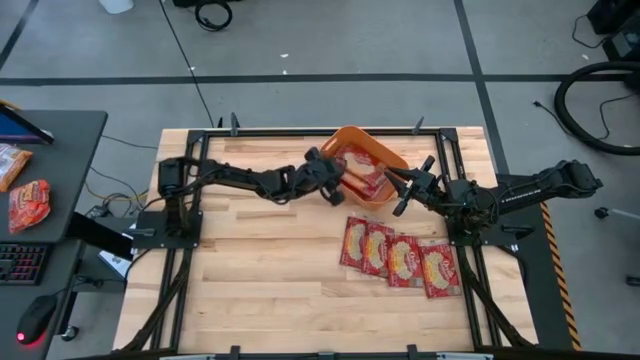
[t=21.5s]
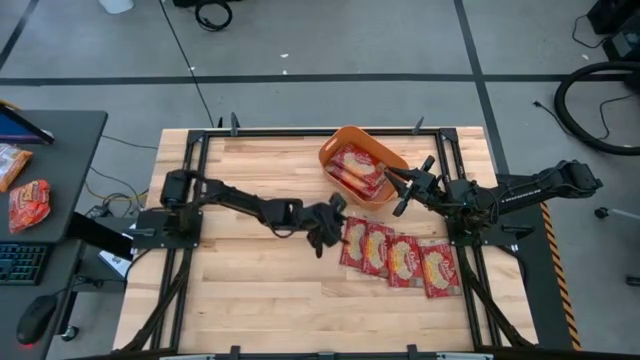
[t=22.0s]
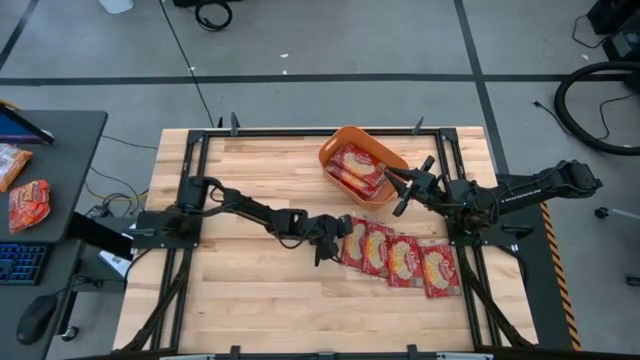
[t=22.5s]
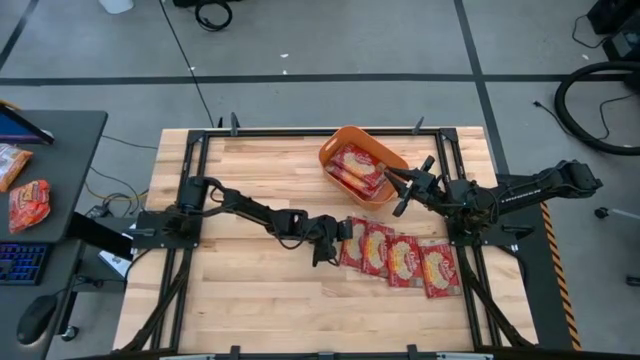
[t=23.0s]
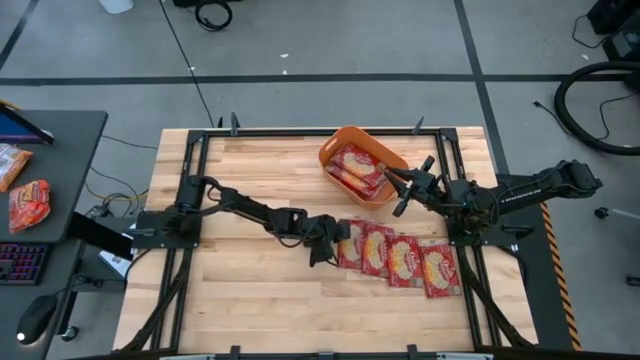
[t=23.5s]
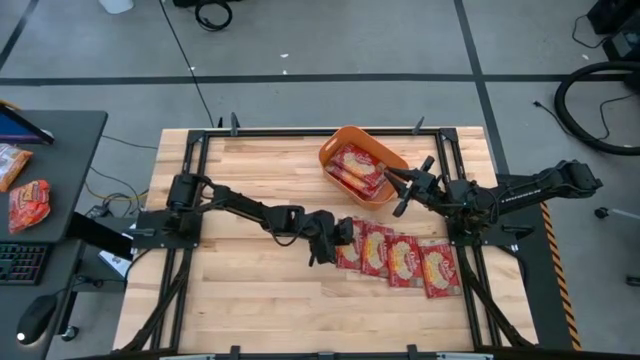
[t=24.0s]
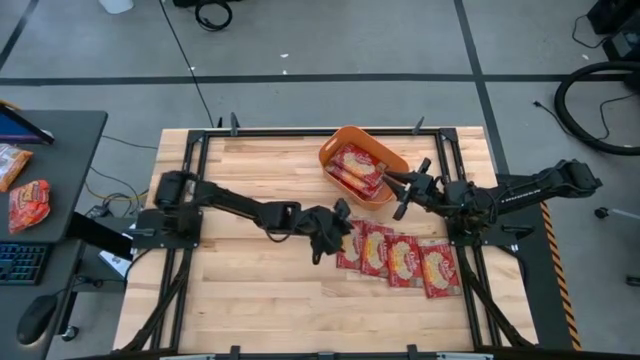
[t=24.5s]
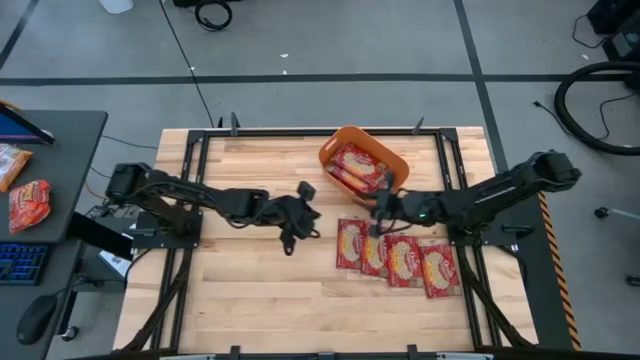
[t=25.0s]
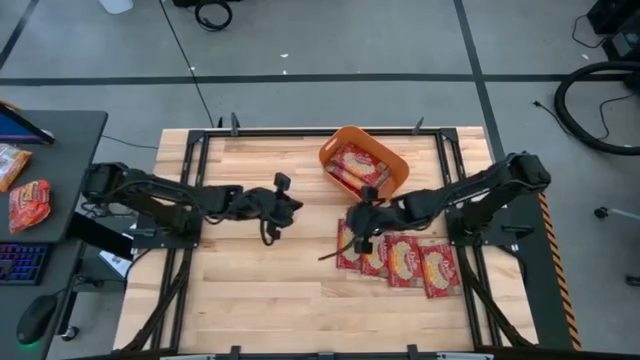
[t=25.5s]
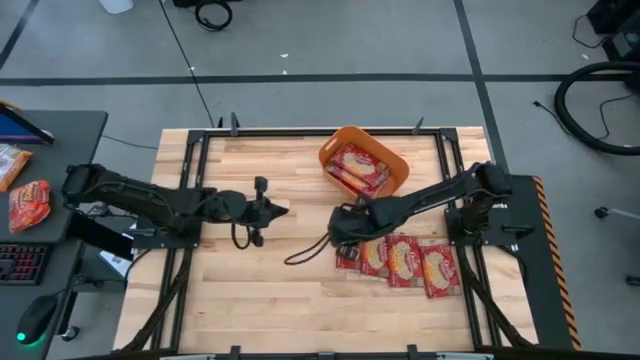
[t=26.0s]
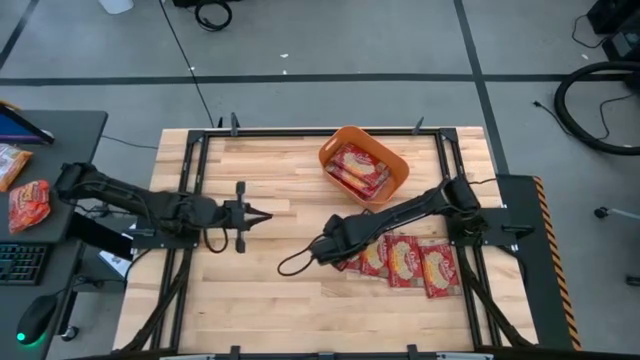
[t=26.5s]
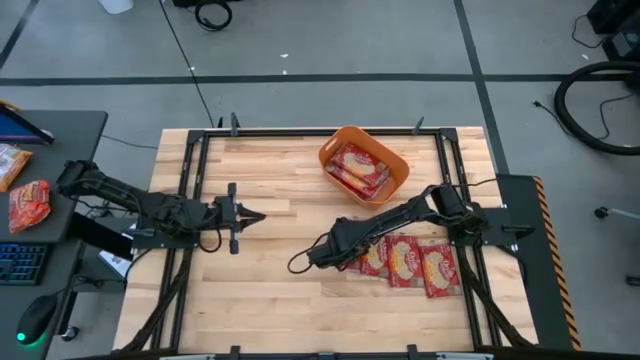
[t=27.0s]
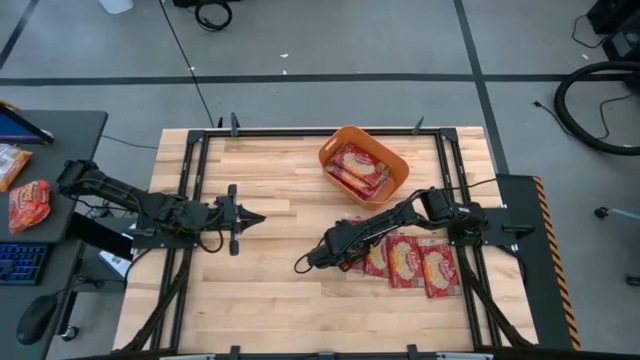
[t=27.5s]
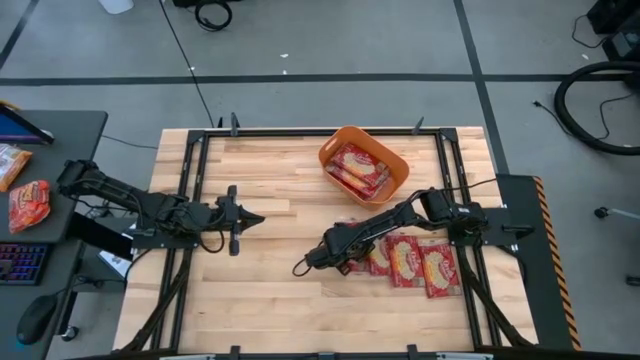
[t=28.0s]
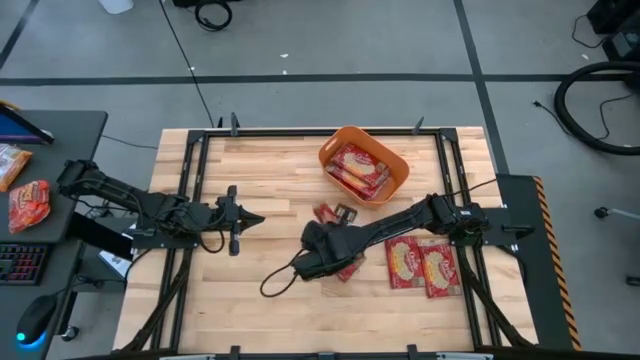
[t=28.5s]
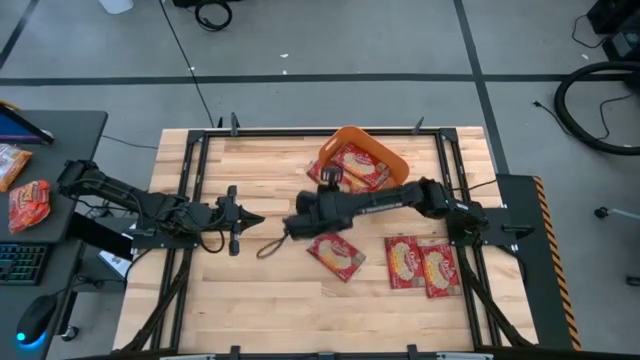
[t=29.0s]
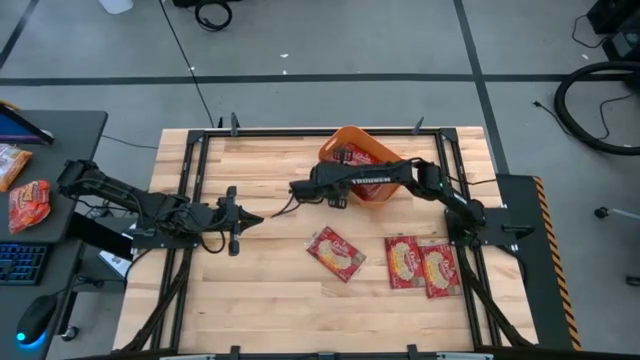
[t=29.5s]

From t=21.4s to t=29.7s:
Task: Sort popcorn bags into baskets
Put the popcorn bag into the bin

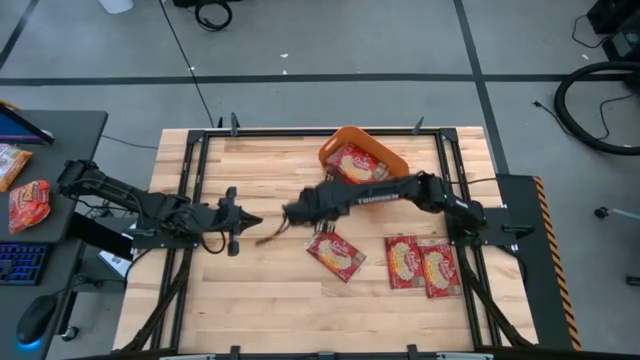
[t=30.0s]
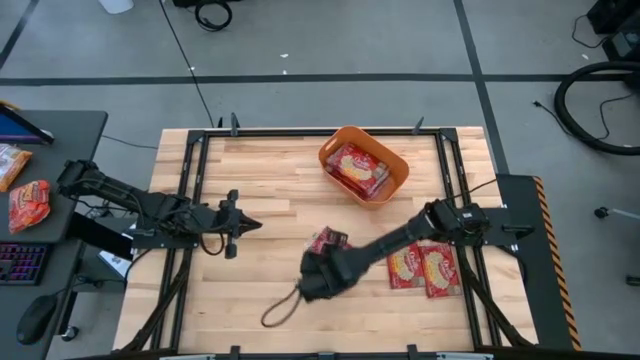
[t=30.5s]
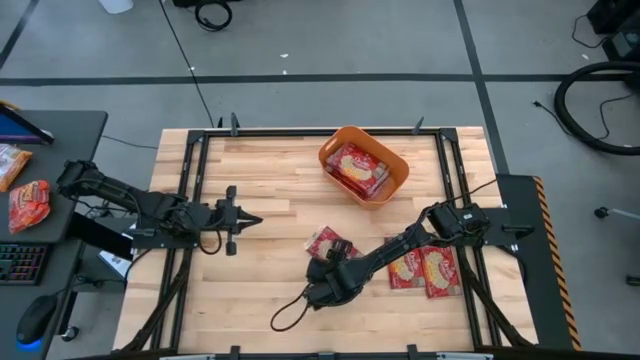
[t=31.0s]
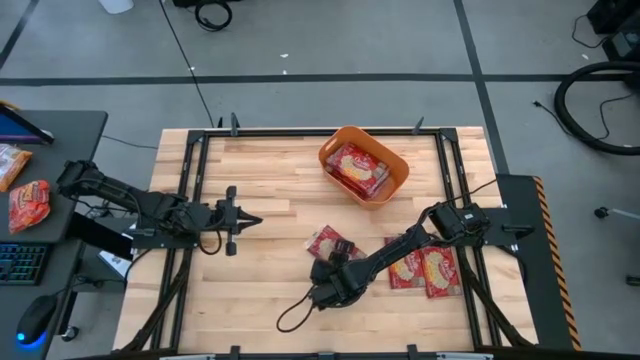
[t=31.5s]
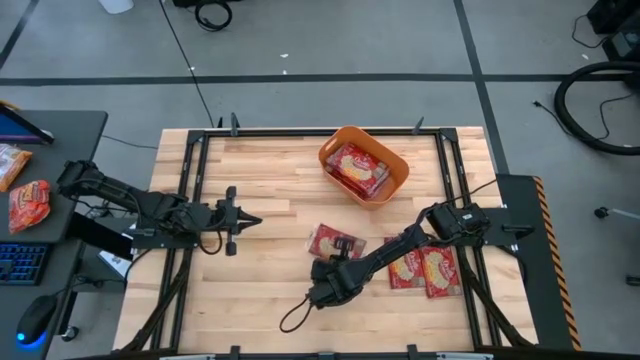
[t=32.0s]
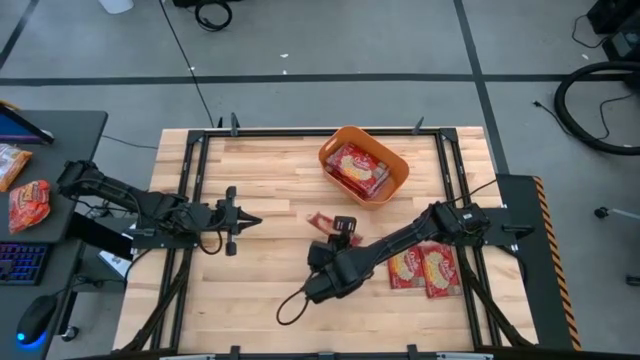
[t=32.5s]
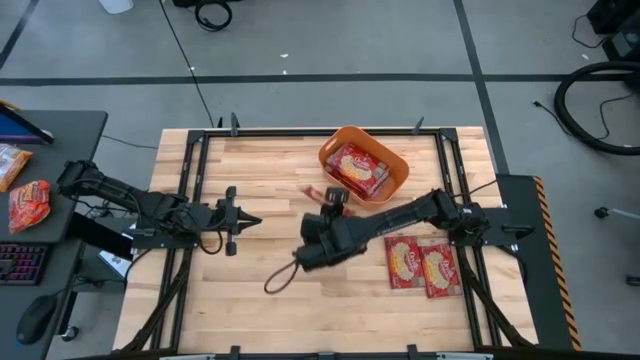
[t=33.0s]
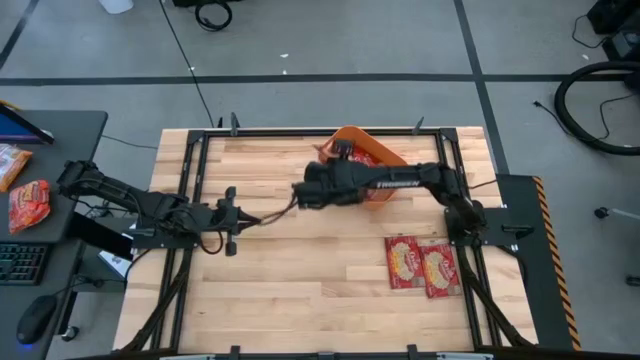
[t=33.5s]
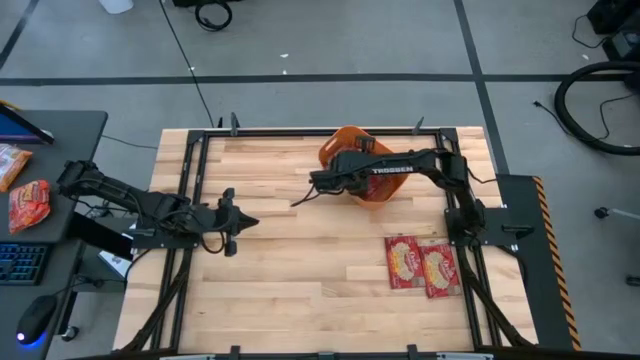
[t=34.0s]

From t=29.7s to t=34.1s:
Put the left popcorn bag into the bin

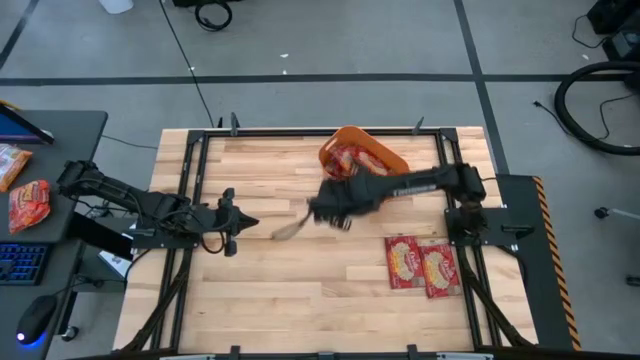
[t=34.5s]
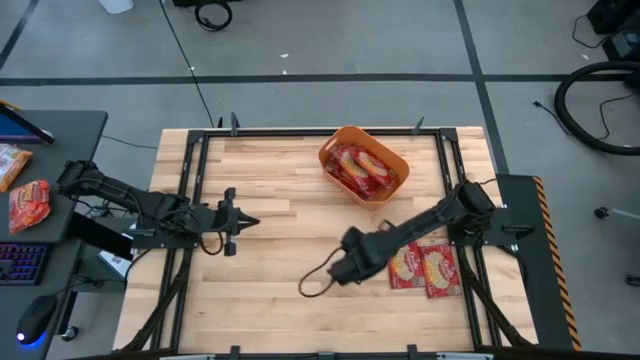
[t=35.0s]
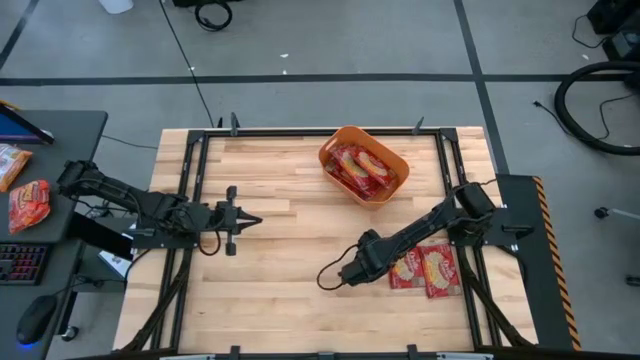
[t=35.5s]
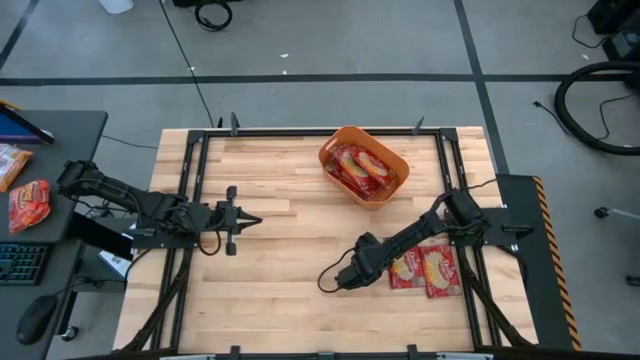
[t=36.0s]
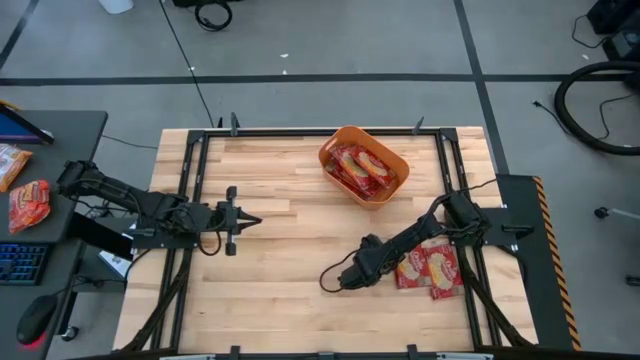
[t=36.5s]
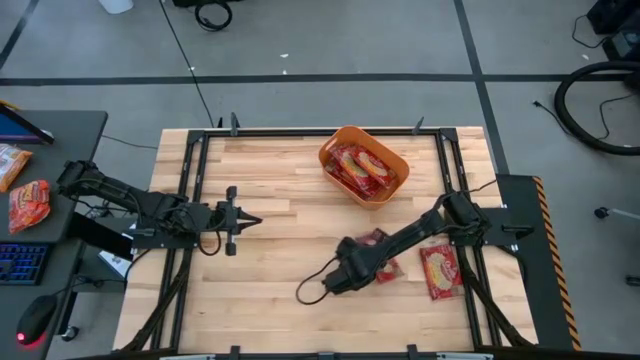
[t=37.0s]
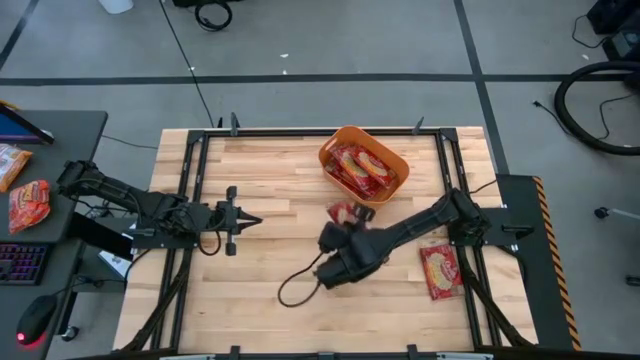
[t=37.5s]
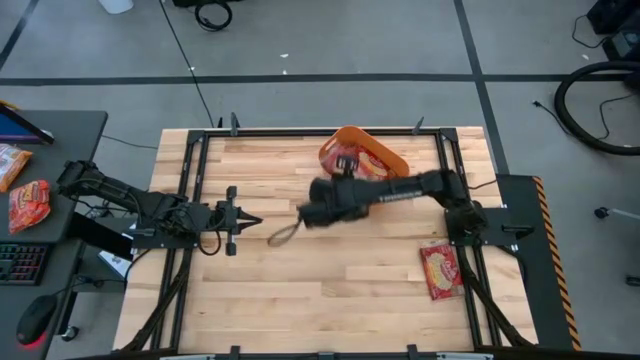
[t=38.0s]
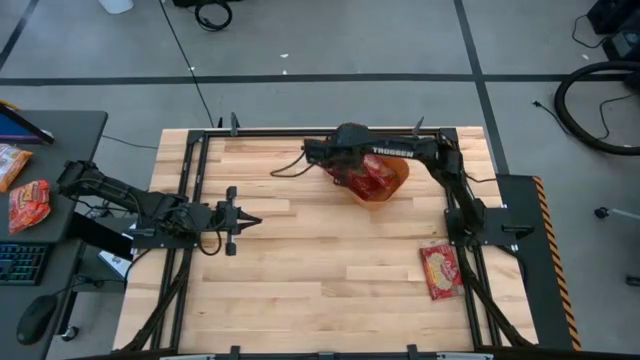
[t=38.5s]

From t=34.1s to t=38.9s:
Put the left popcorn bag into the bin

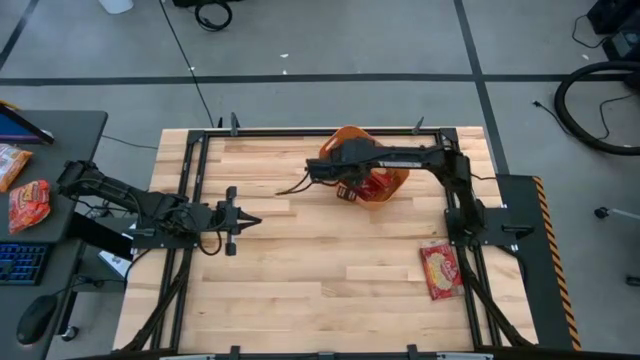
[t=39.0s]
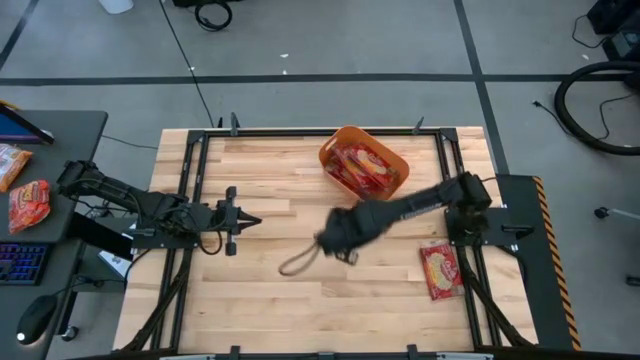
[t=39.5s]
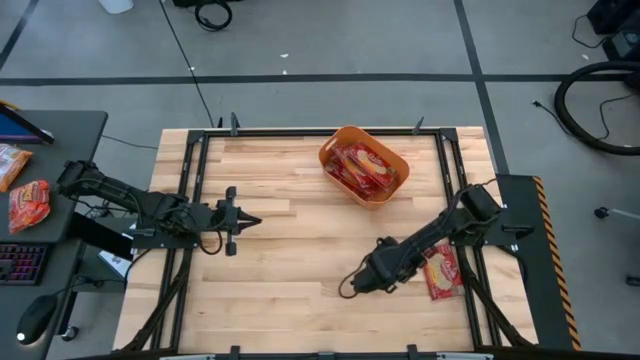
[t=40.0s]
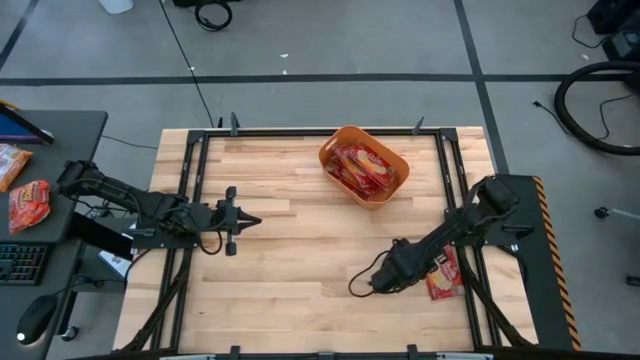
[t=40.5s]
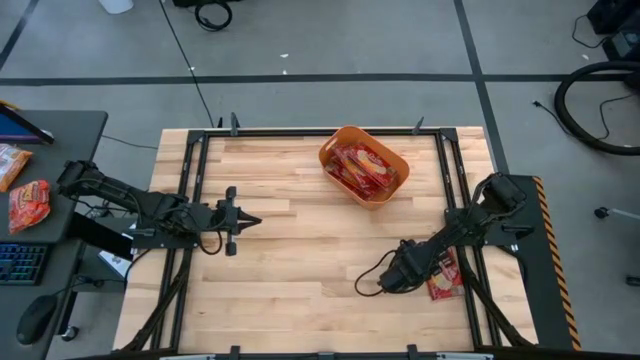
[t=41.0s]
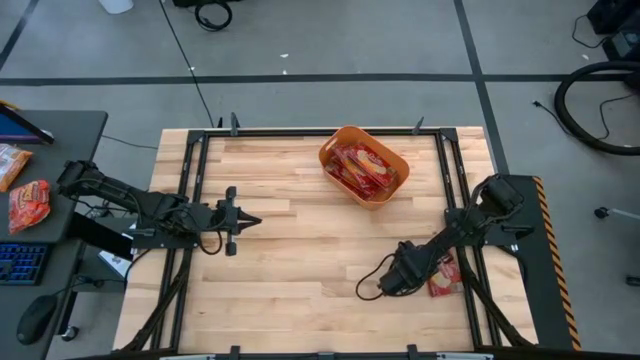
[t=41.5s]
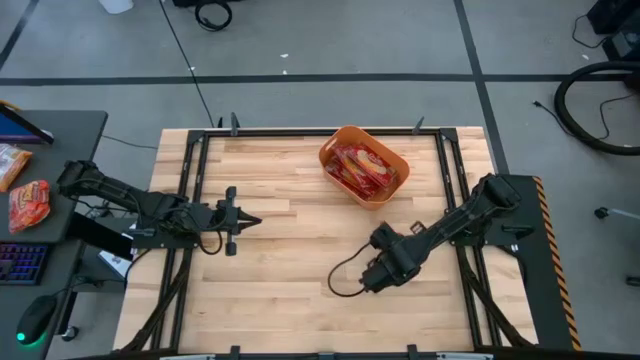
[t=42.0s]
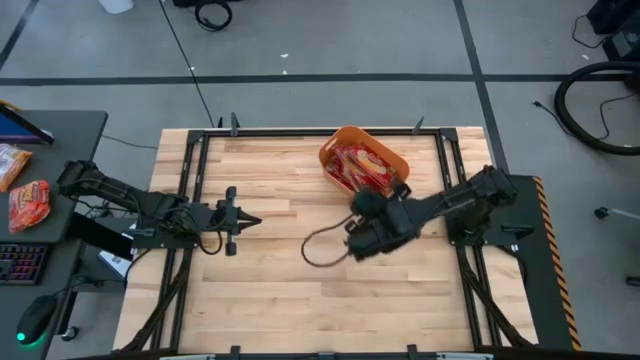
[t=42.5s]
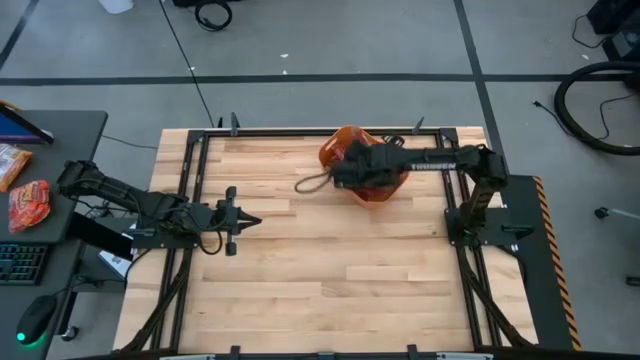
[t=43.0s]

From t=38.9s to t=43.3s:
Put the popcorn bag into the bin
